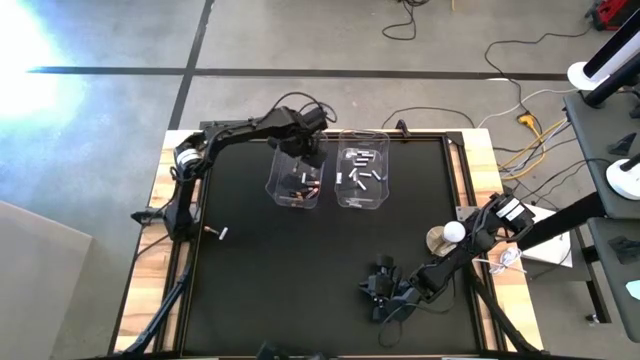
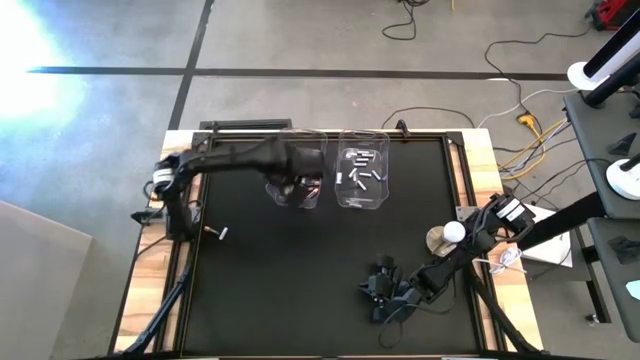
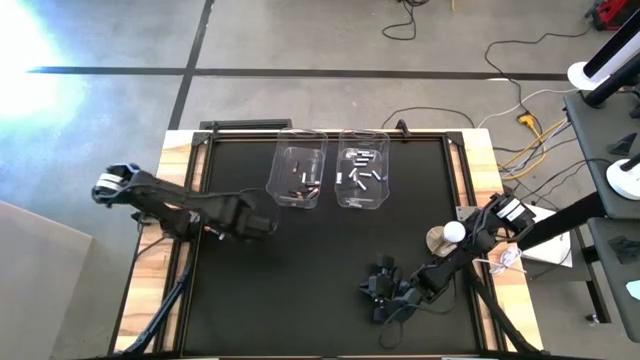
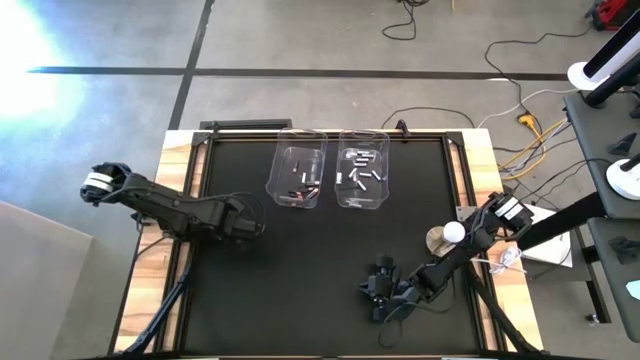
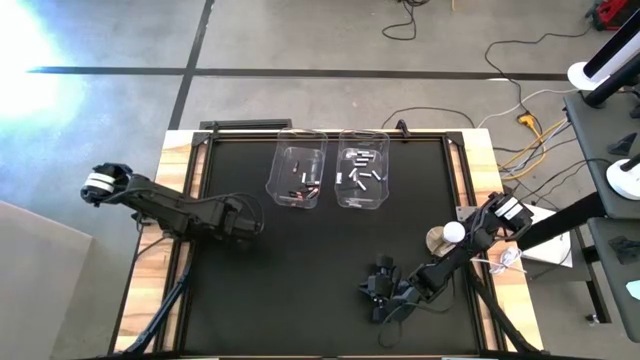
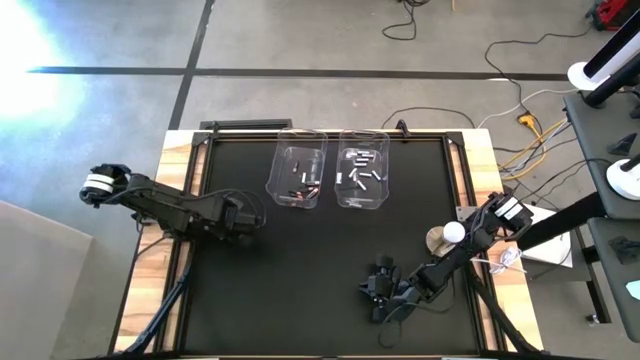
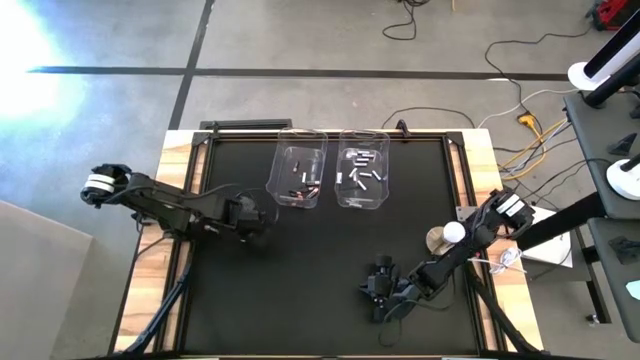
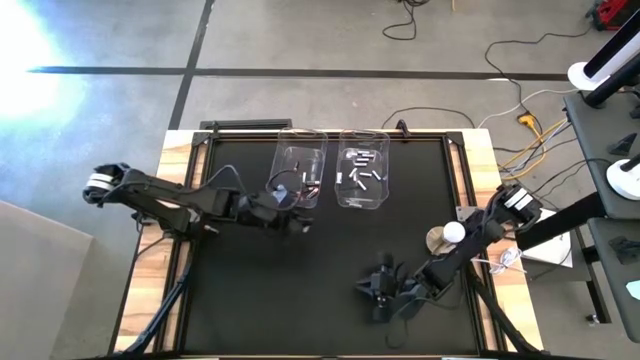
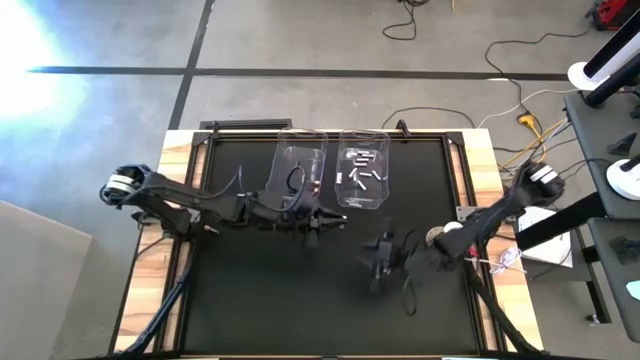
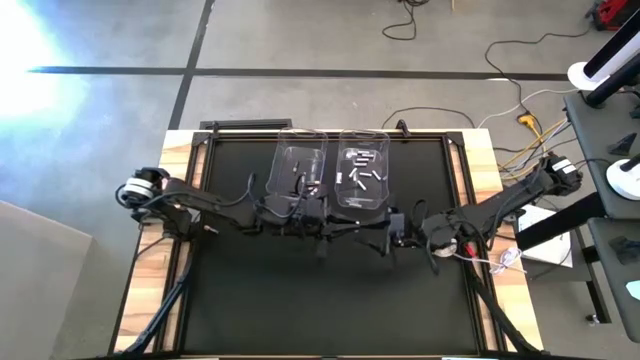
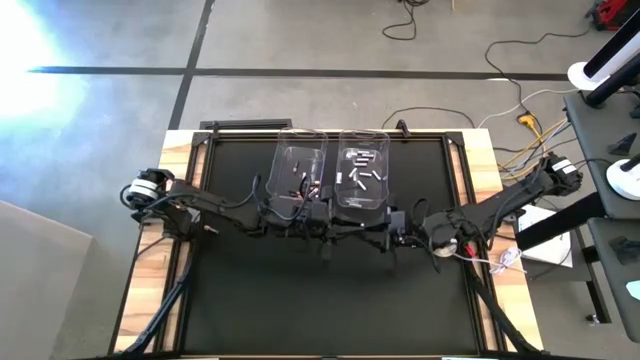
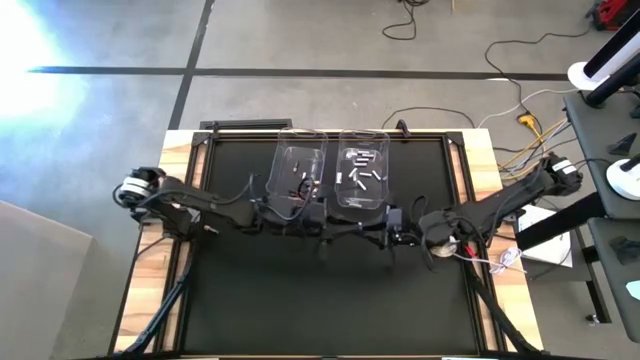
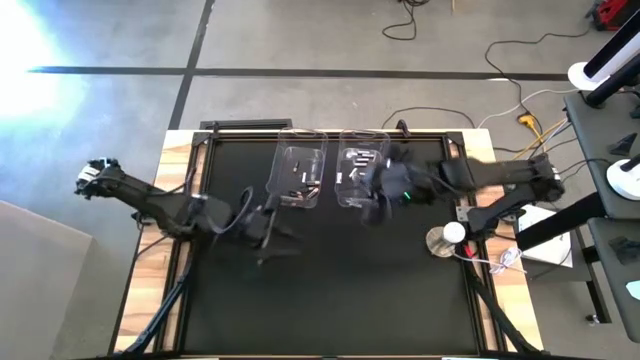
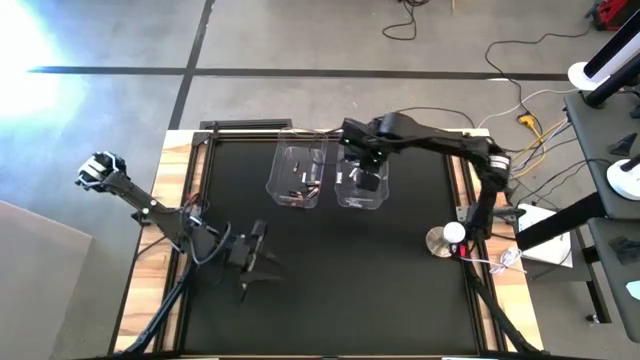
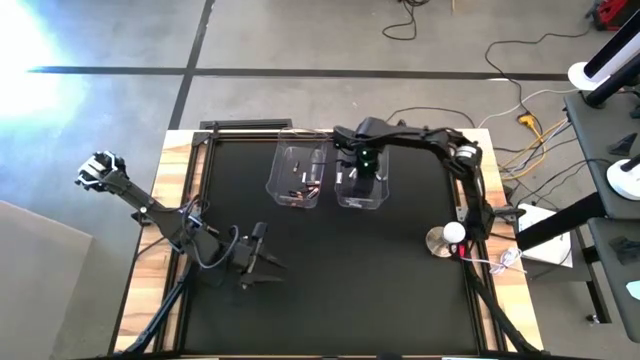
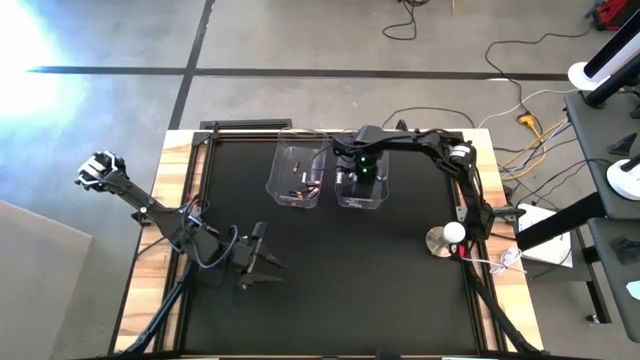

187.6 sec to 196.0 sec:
Task: Sort batteries
Put the white battery into the right transparent bin

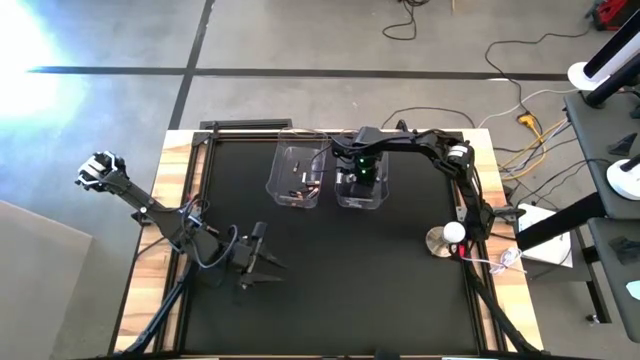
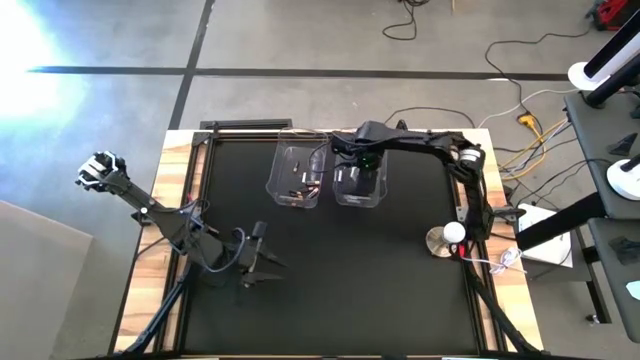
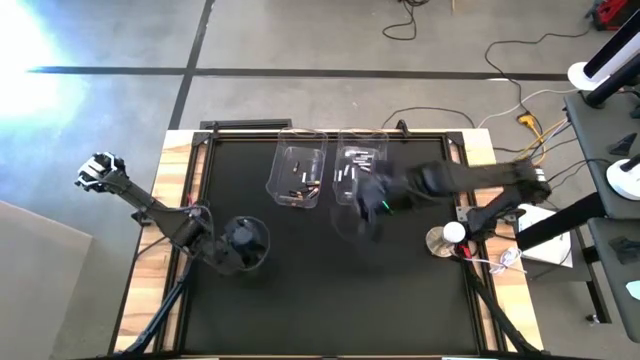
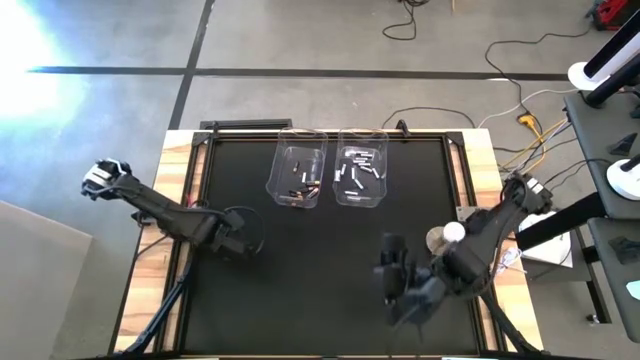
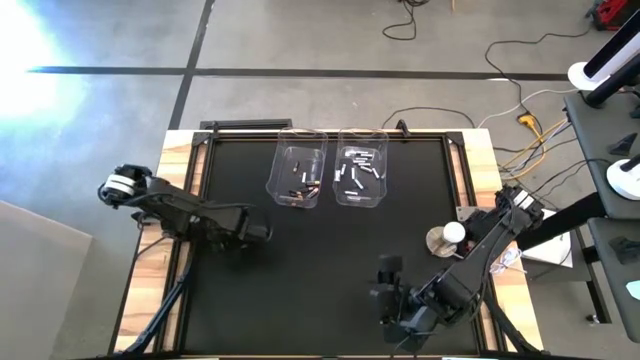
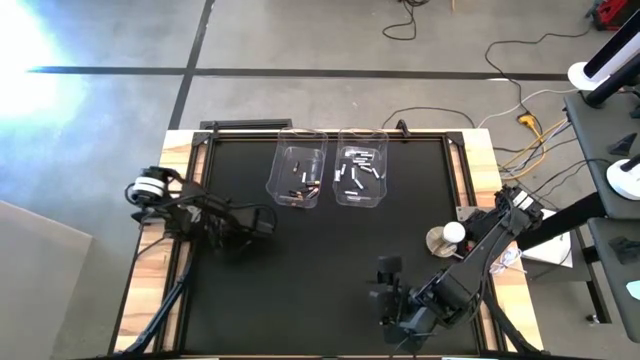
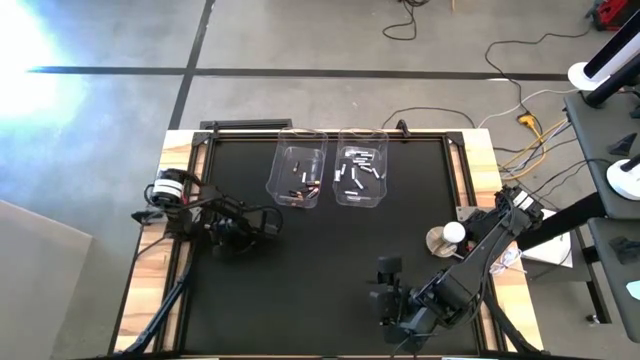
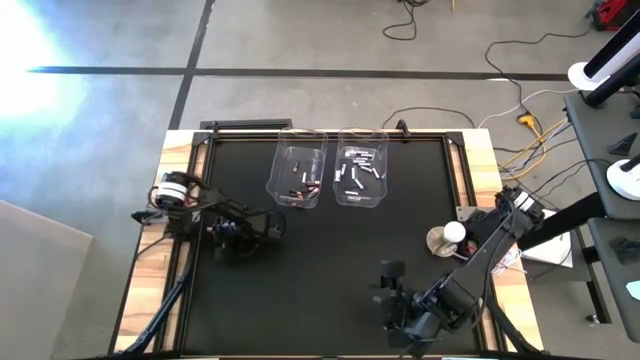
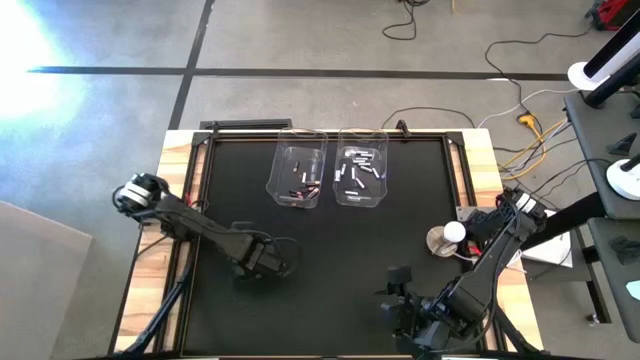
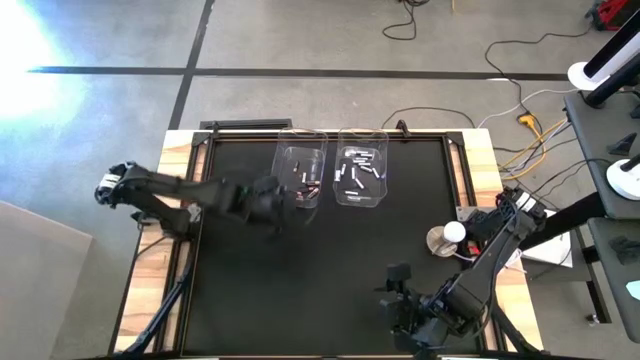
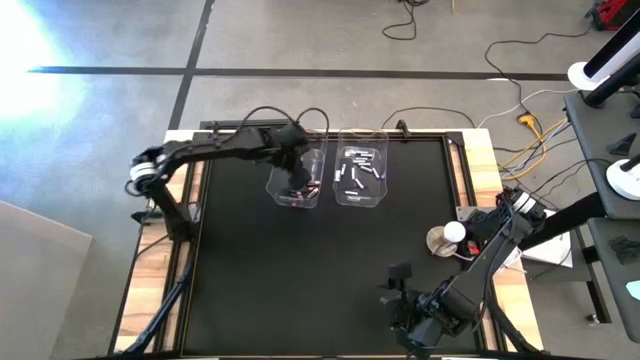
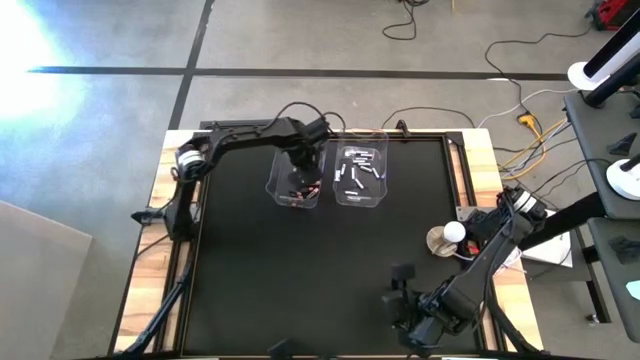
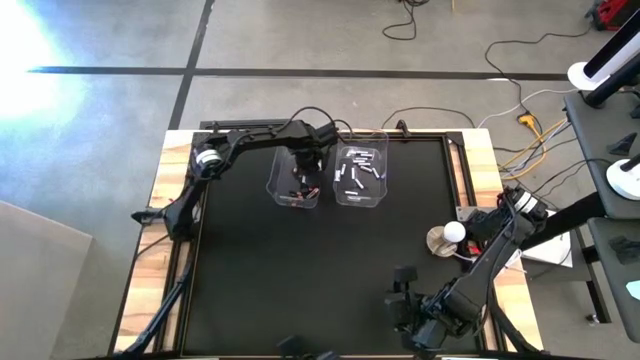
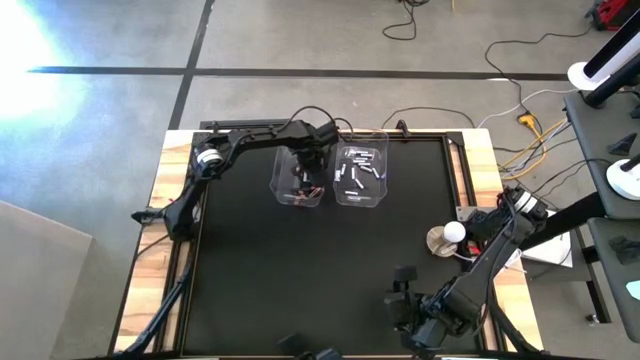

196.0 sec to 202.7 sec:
Put the black battery into the left transparent bin

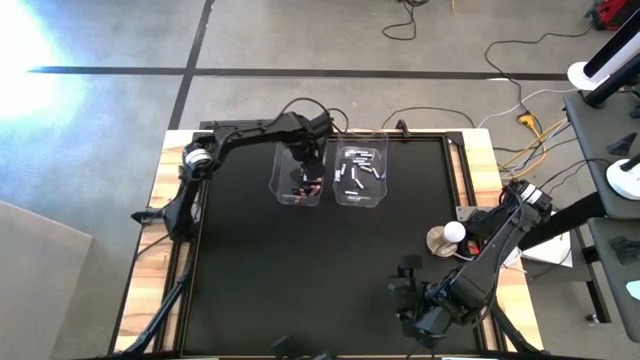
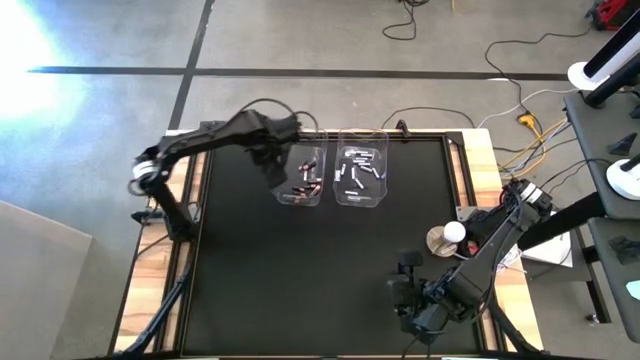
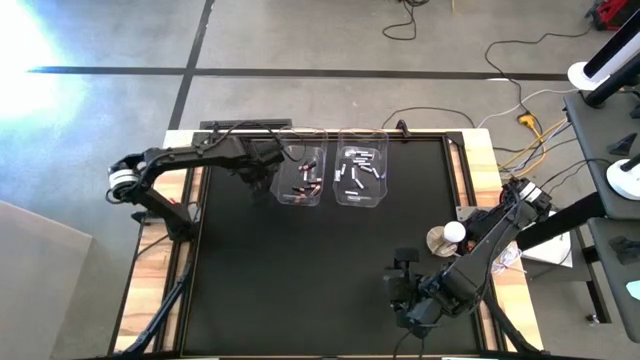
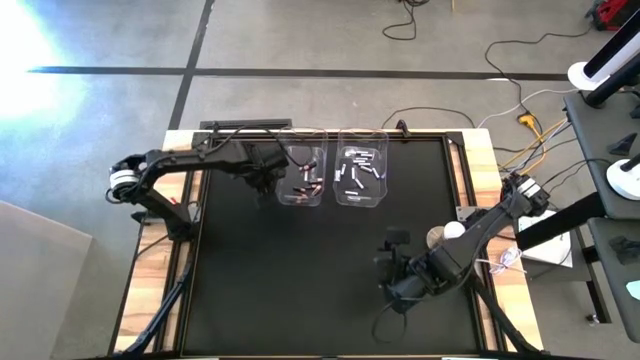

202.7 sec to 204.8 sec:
Adjust the left transparent bin

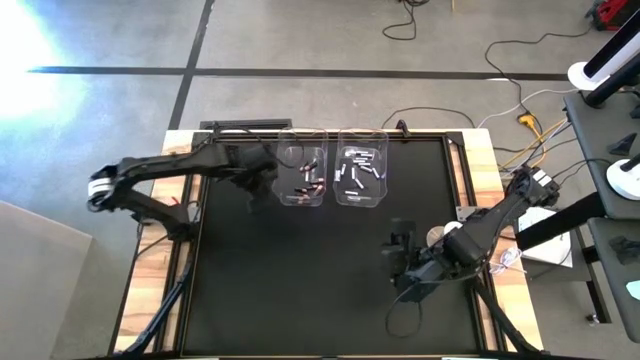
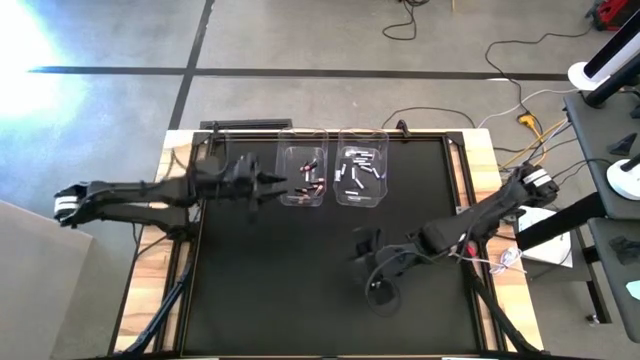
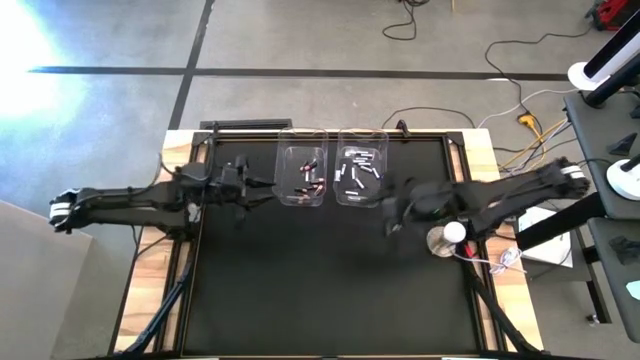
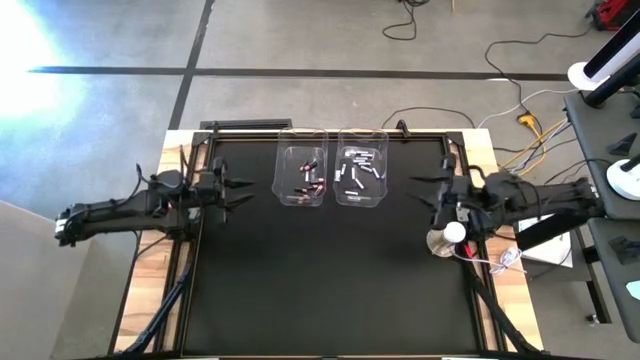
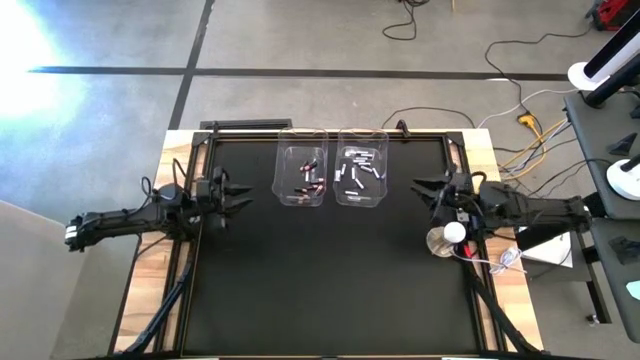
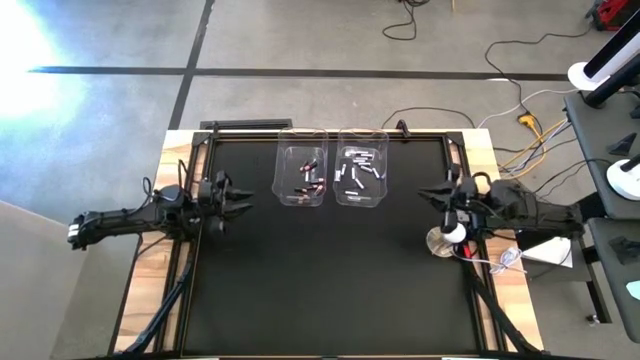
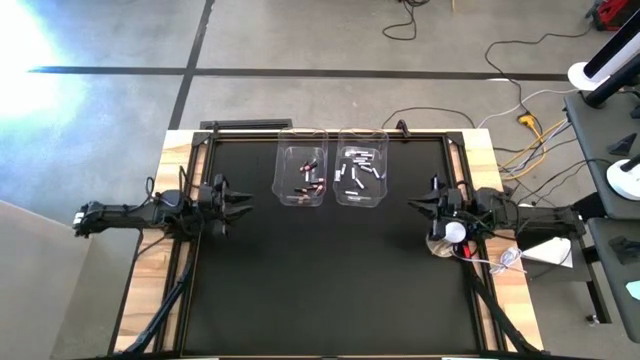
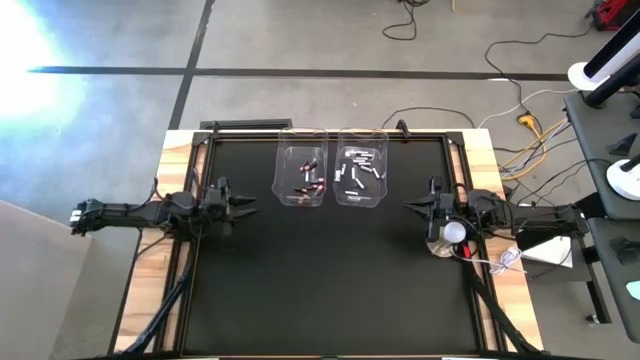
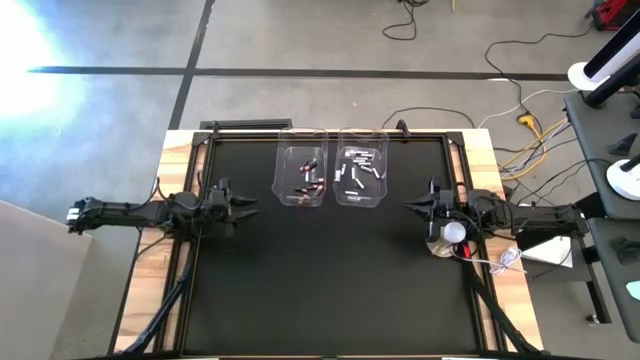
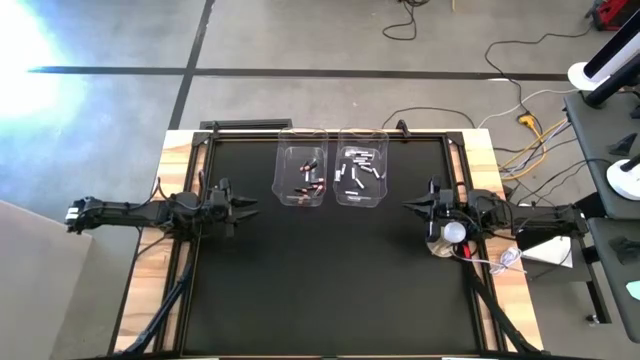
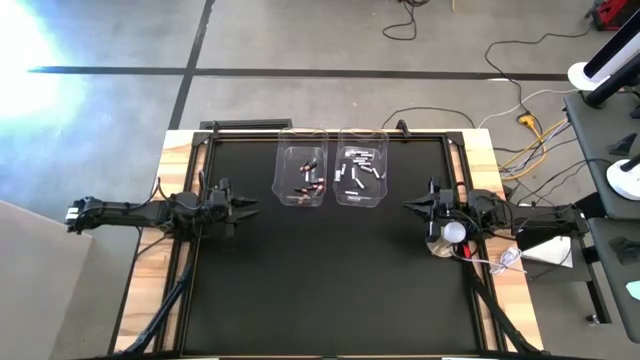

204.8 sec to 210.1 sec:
Return to Home Position
